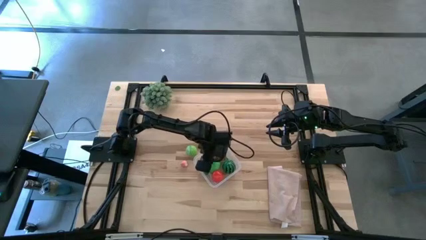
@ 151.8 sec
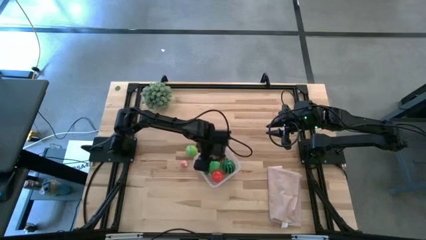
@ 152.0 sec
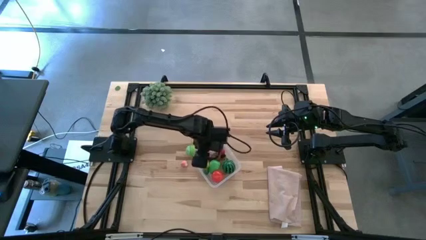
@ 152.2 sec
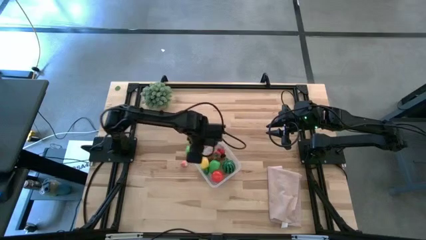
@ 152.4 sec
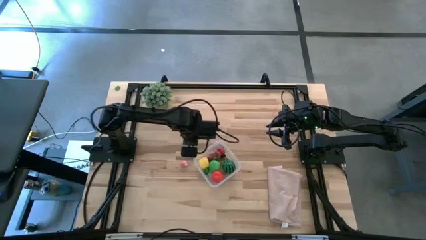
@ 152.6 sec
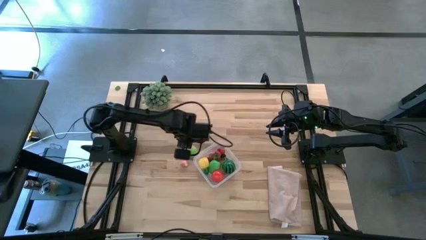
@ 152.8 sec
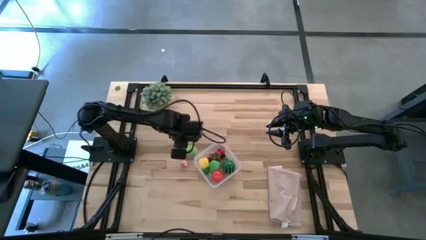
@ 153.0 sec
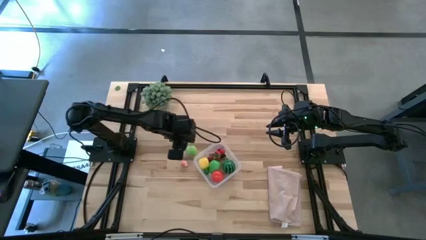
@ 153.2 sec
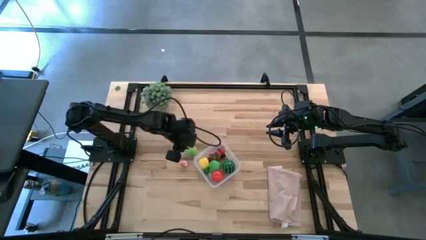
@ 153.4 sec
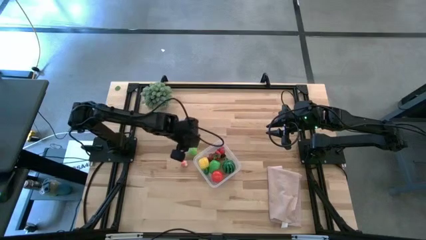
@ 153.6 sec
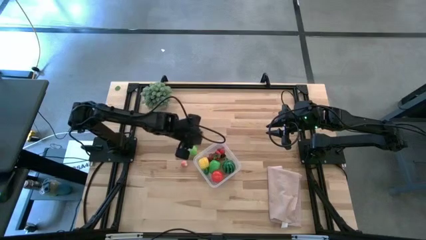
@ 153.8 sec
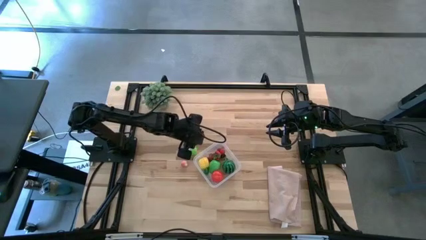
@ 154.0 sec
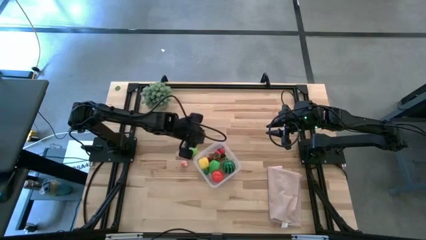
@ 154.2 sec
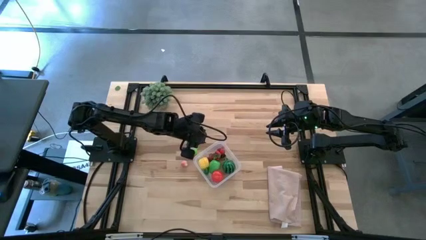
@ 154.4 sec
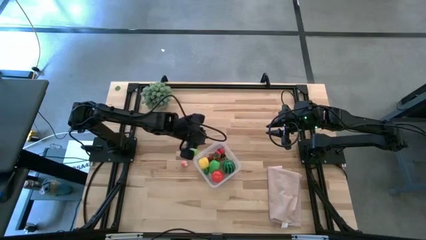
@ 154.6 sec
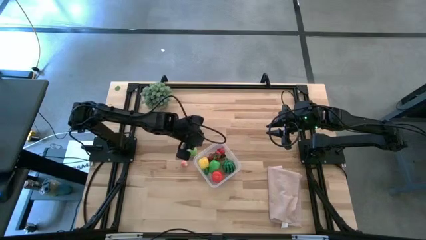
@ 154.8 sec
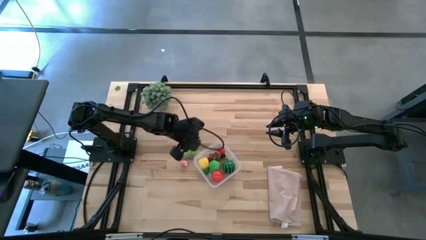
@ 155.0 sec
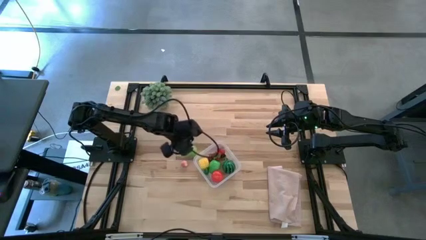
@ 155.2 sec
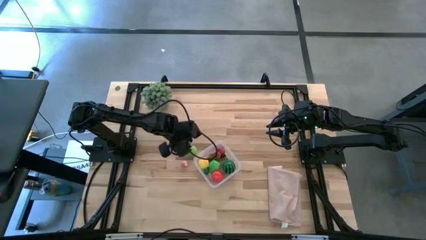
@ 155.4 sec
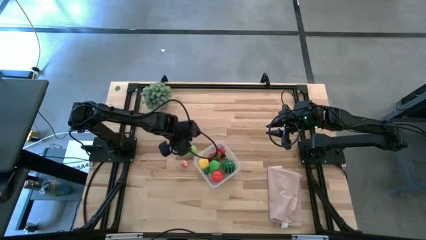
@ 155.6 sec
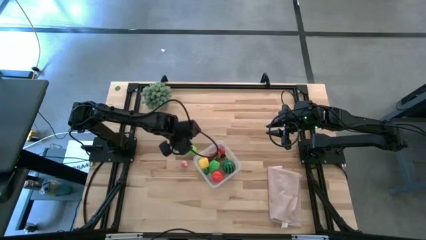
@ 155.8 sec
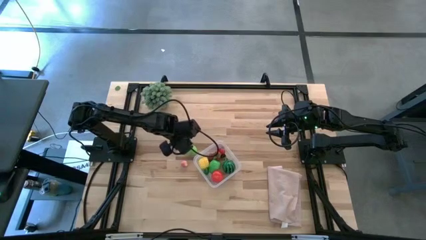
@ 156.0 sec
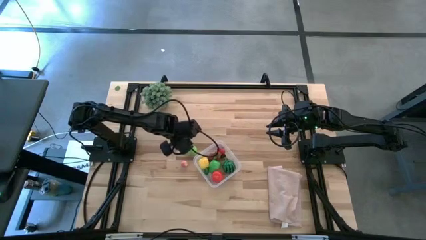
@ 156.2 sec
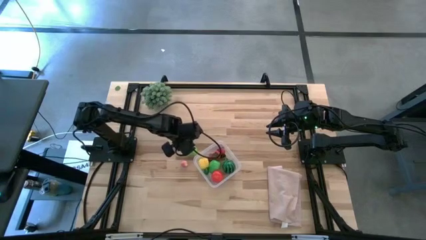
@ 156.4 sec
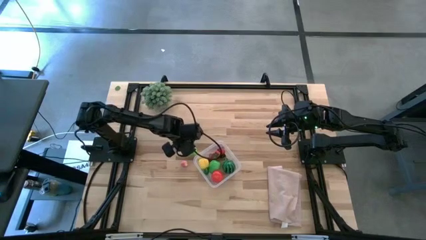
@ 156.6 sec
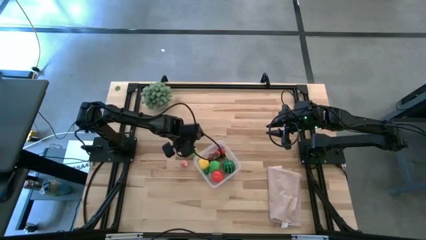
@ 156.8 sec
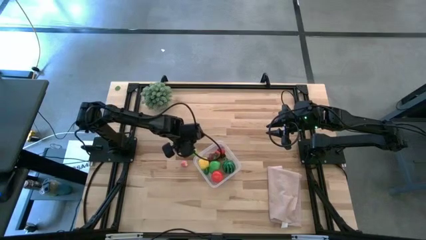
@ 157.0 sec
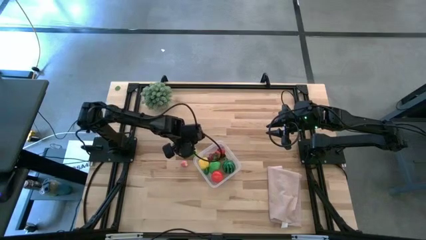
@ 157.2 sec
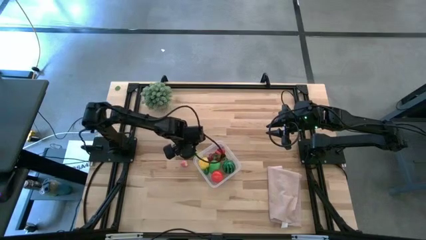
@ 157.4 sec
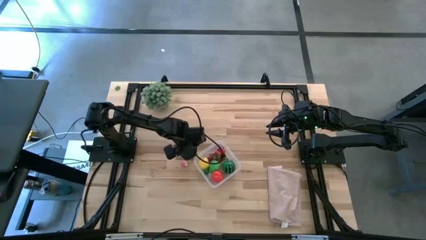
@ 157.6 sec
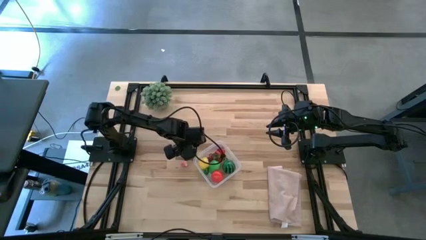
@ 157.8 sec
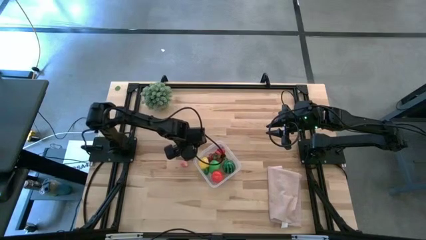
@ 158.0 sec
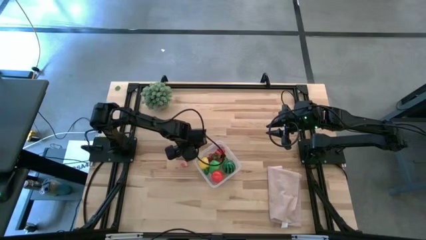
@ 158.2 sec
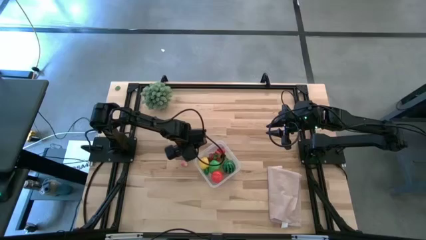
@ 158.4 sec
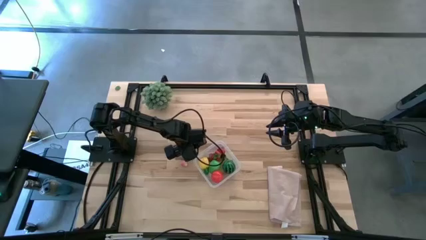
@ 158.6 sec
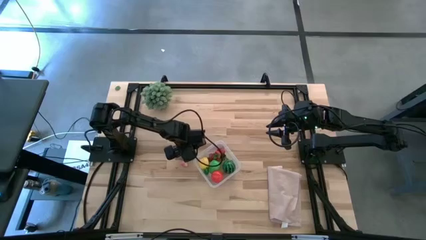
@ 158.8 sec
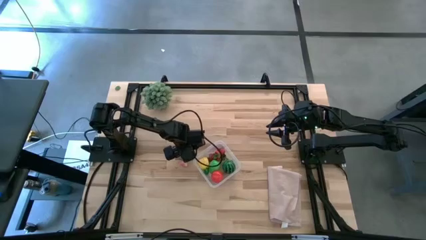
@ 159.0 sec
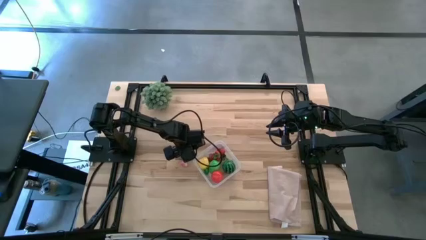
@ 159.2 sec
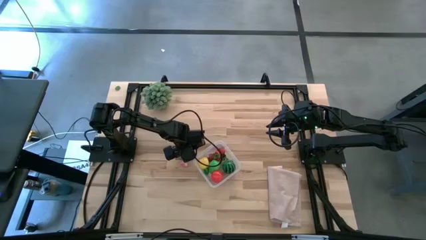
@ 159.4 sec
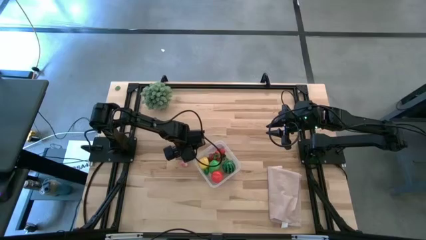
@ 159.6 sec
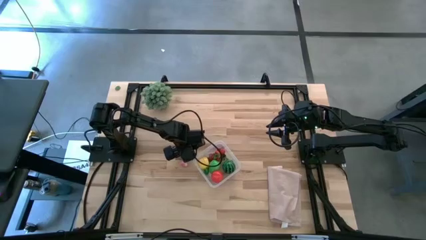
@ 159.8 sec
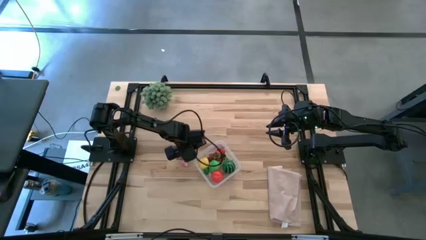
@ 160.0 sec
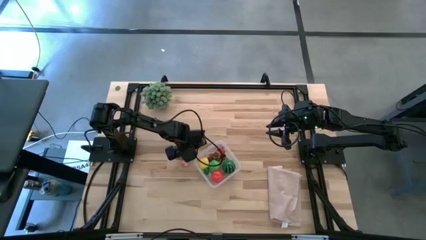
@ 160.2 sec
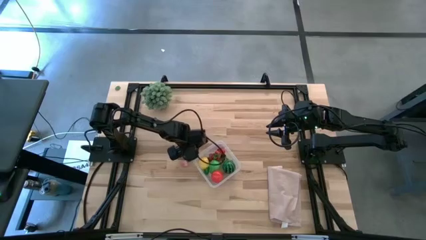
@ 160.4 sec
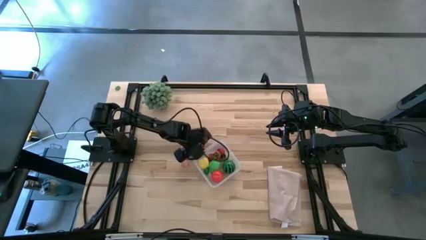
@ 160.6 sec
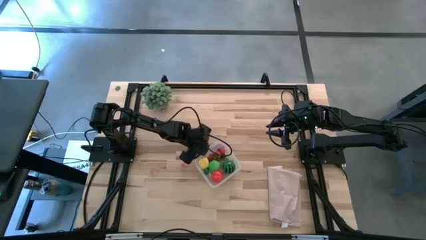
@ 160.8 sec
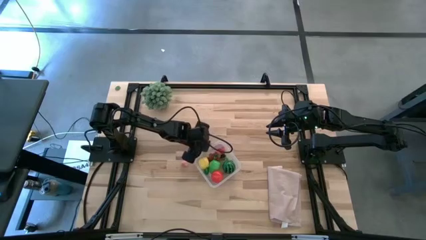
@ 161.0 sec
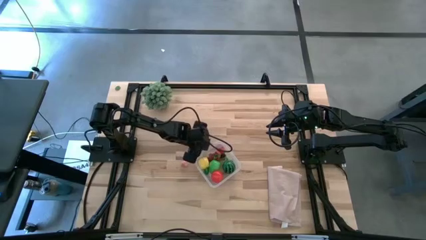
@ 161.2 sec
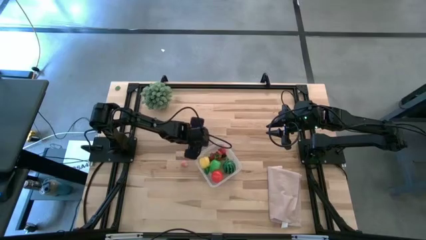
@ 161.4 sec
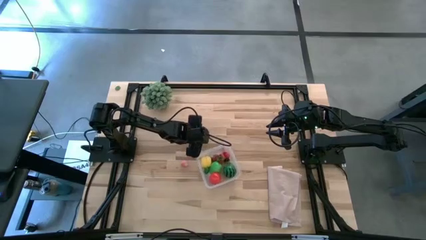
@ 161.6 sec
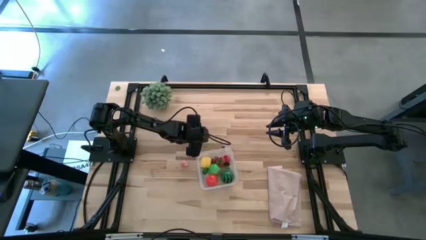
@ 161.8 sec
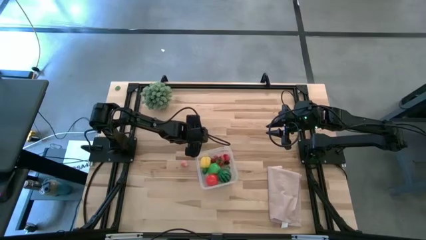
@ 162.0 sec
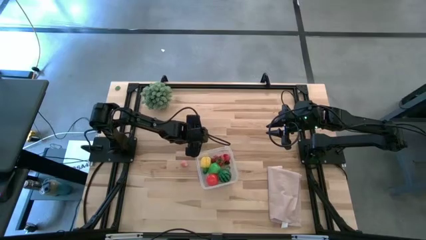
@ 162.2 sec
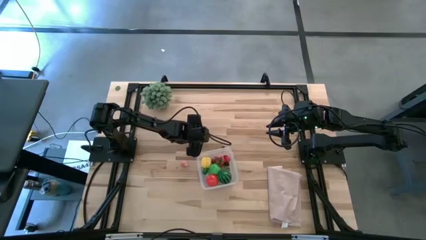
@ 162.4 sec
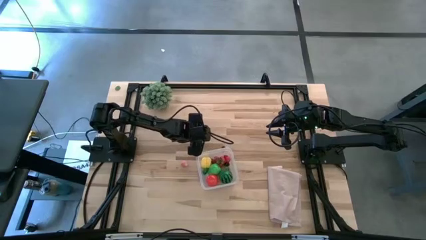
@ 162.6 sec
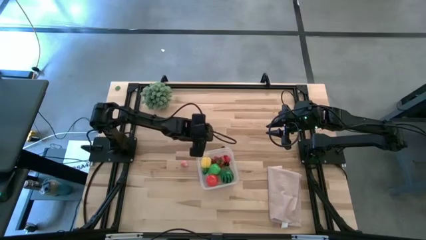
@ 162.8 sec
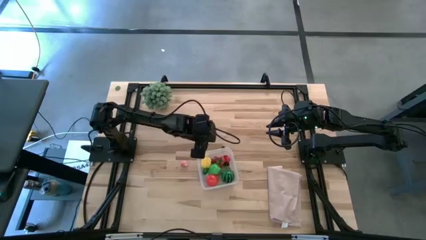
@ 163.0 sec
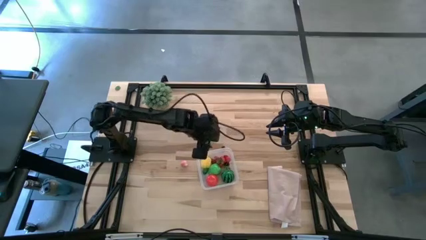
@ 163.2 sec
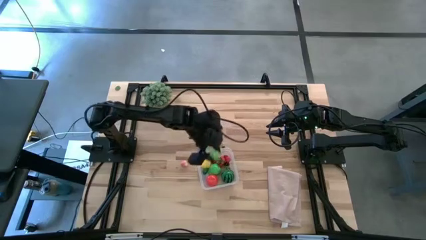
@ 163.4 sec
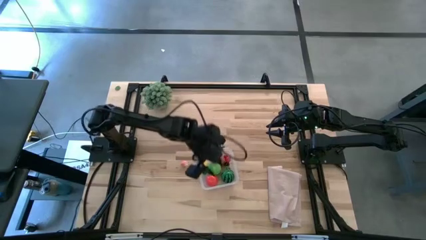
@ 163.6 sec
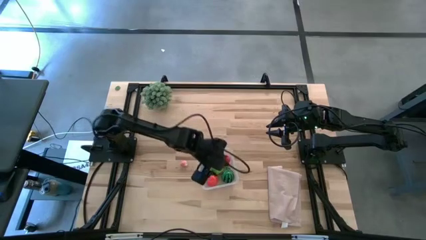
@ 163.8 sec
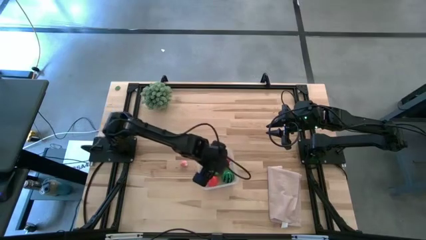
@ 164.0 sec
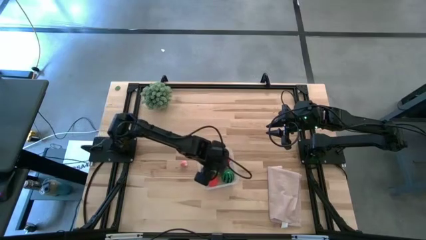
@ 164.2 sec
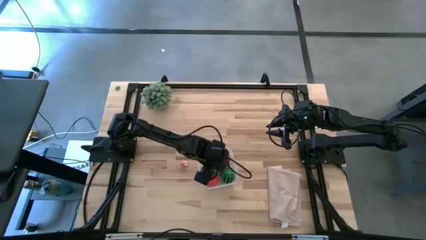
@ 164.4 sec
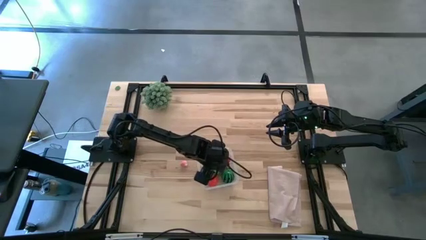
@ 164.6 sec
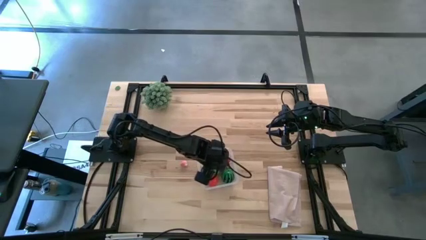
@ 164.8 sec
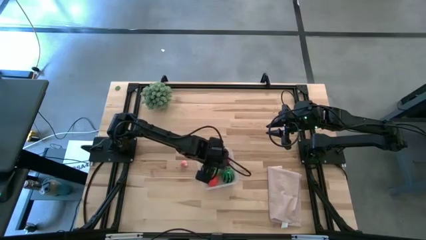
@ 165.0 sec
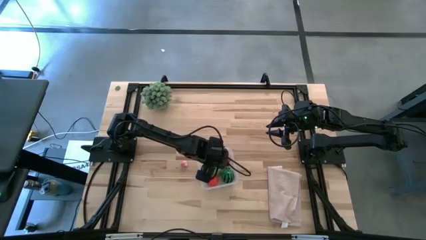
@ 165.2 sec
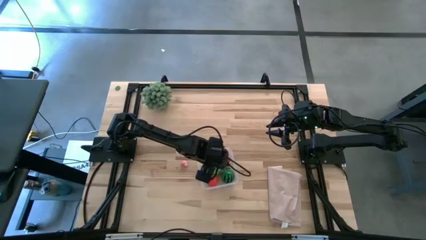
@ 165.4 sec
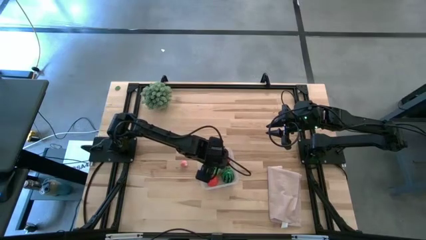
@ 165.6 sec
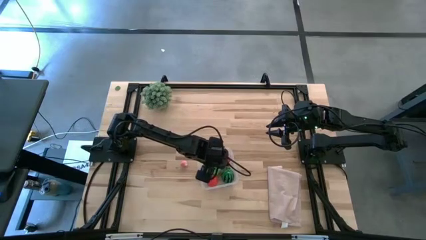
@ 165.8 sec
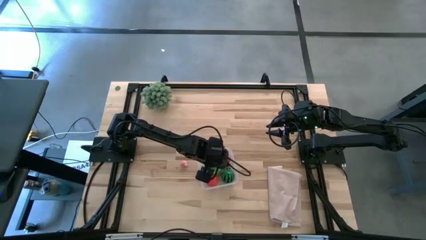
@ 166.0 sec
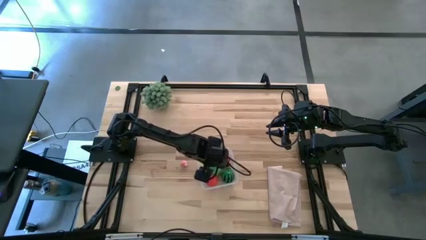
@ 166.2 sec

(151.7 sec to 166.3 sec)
Task: Pick and placing Produce into tupperware
Put the green cabbage into the transparent bin
